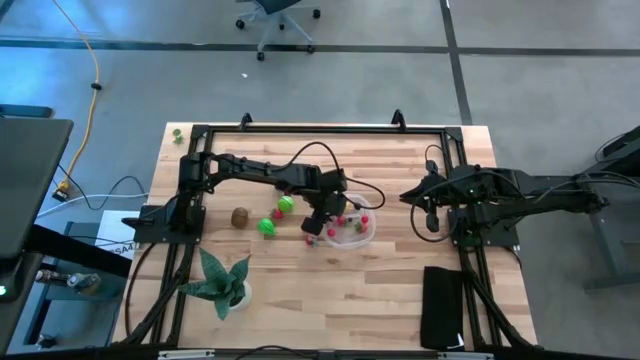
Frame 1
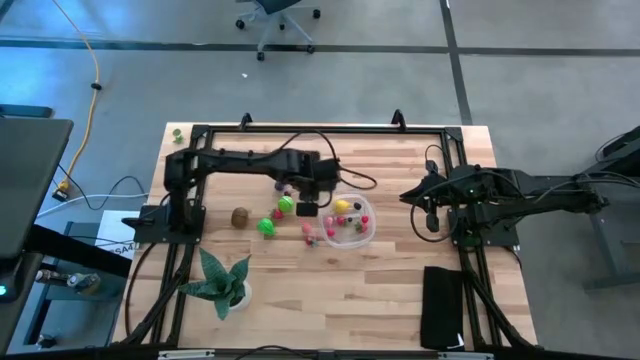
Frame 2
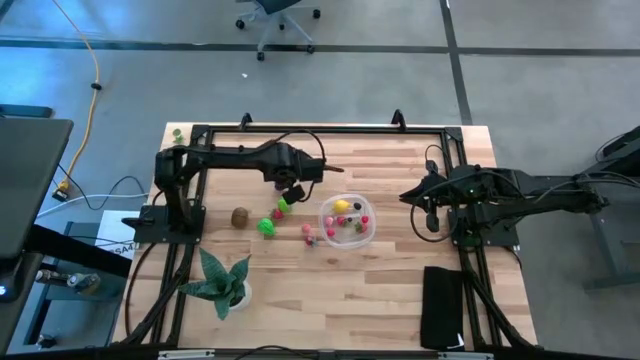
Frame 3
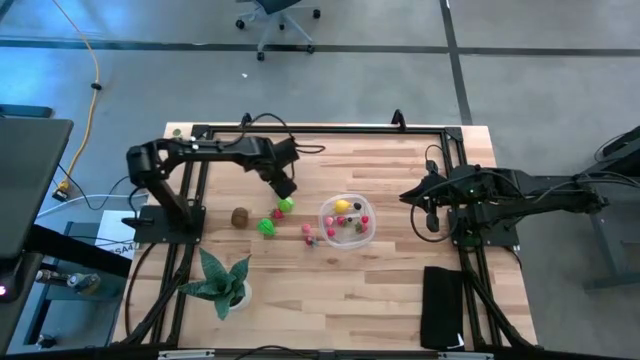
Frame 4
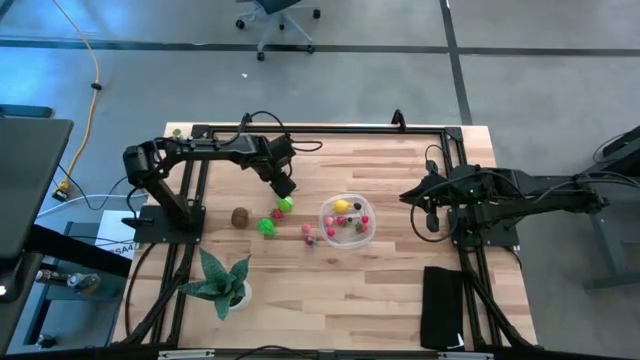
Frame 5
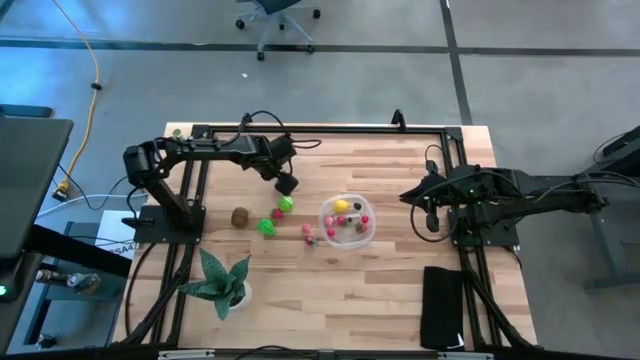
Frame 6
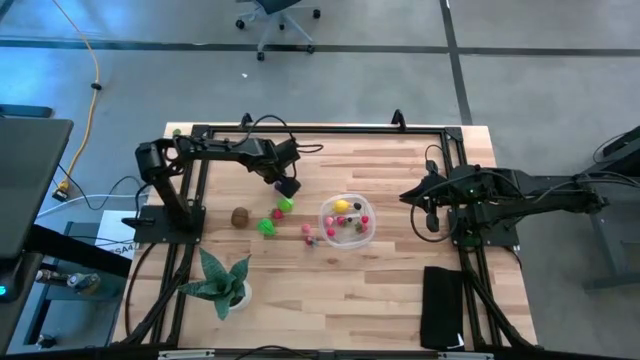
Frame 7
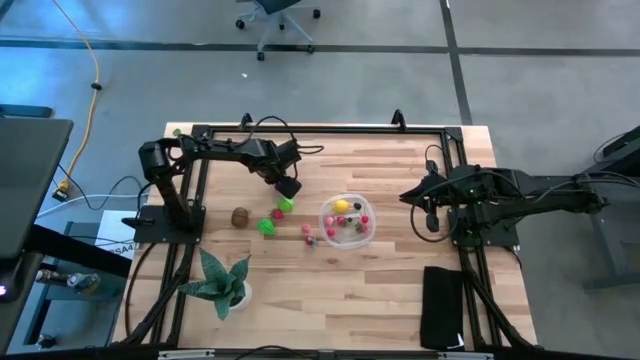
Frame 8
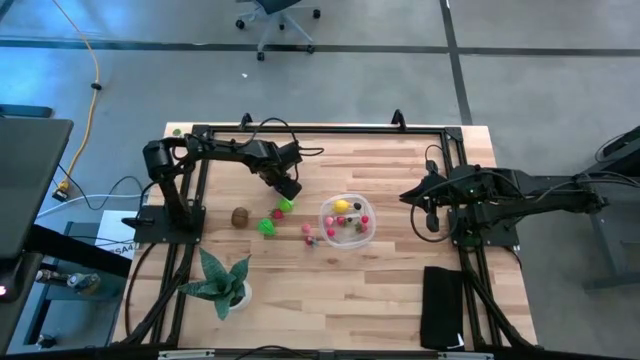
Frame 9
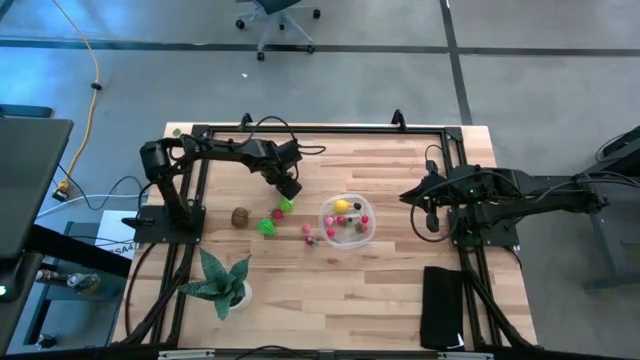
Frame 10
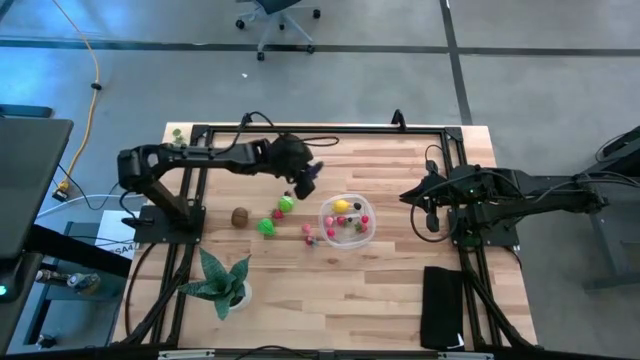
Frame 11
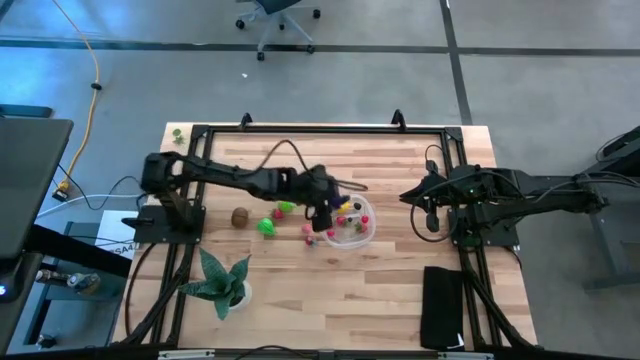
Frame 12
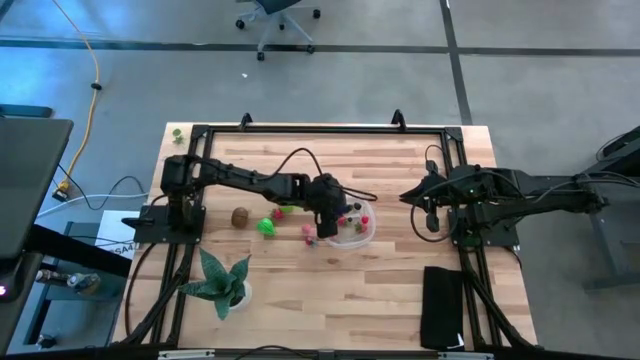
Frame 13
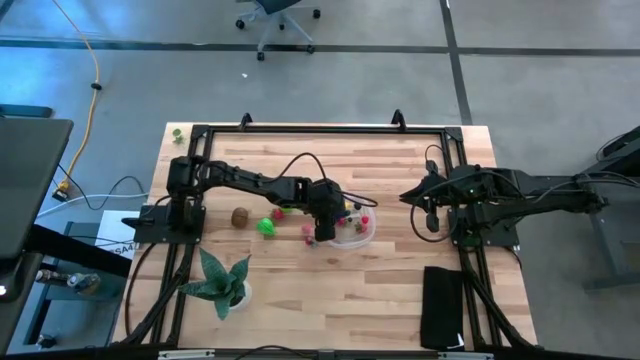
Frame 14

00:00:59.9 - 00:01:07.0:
Task: Pick and placing Produce into tupperware
Put the violet eggplant into the transparent container

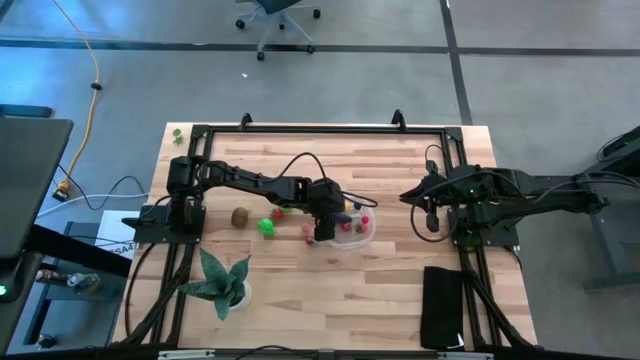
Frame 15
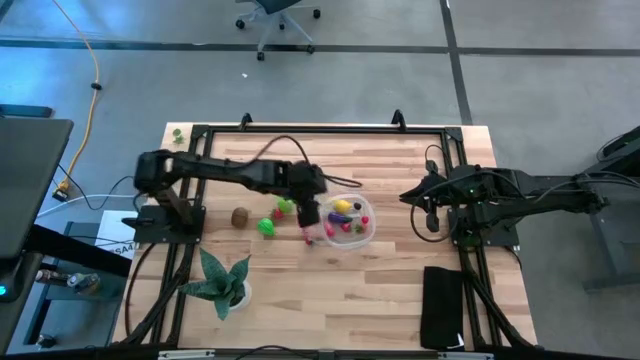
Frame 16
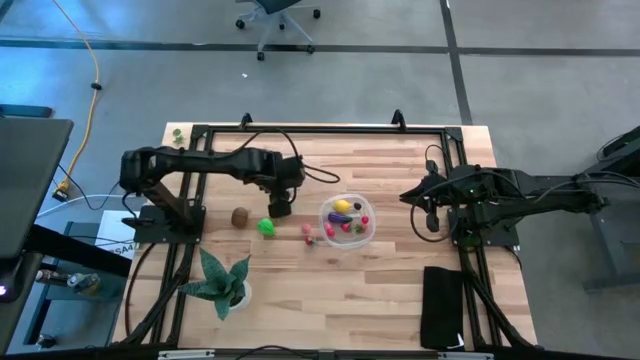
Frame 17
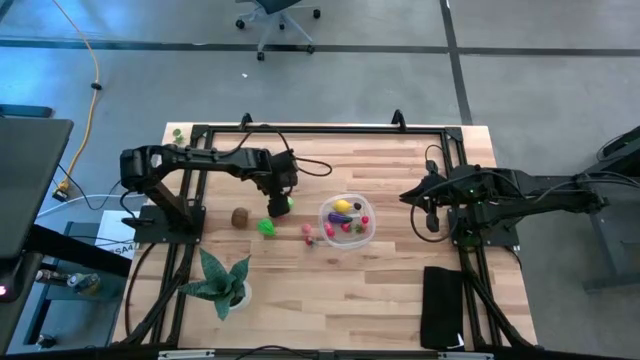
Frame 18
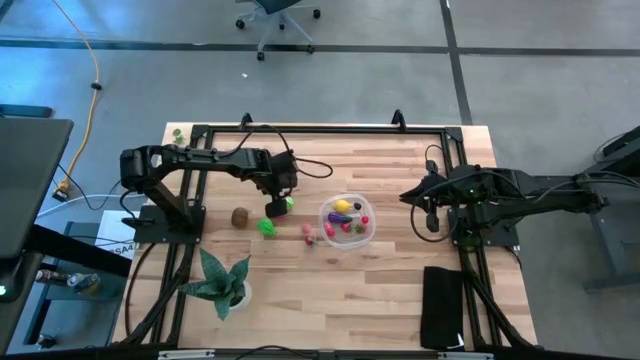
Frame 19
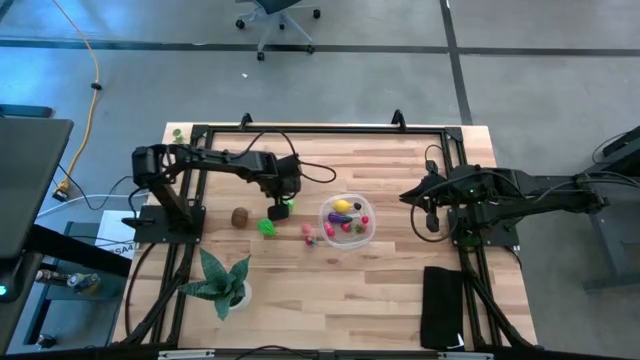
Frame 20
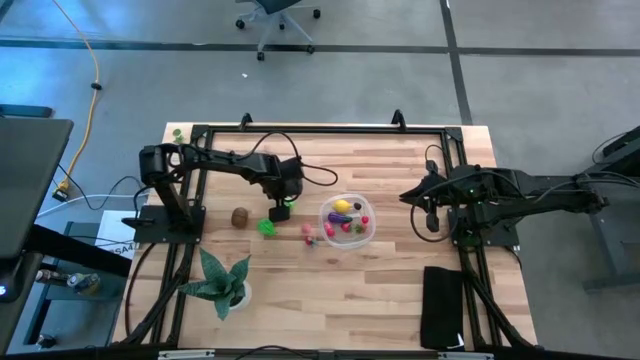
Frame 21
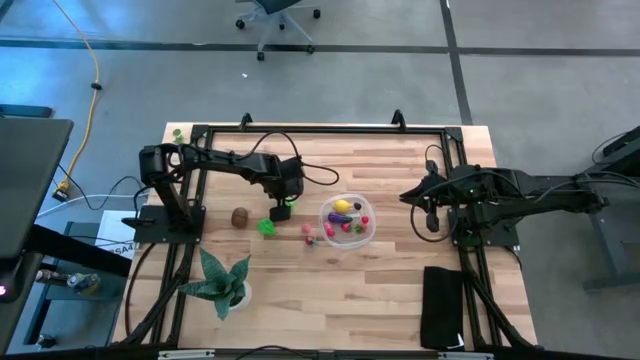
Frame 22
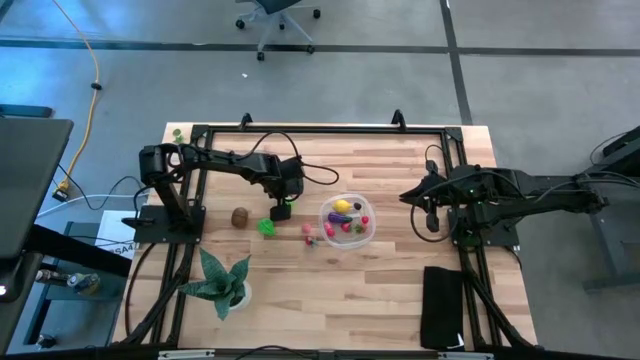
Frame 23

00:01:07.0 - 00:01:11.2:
Put the green cabbage into the transparent container

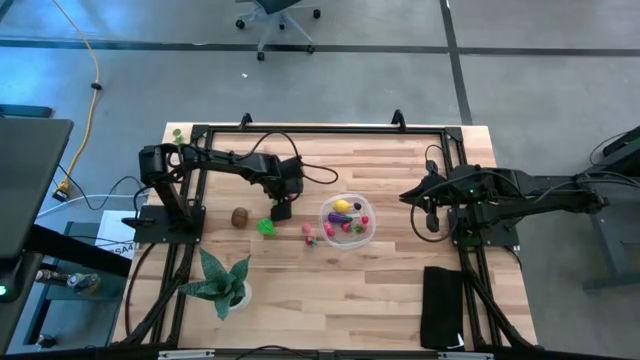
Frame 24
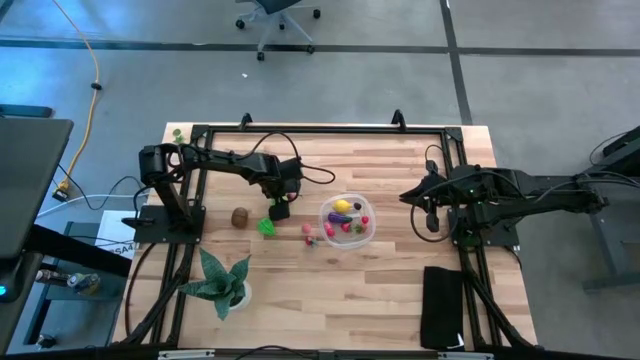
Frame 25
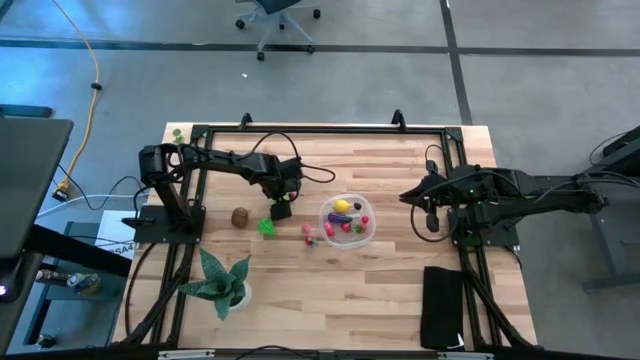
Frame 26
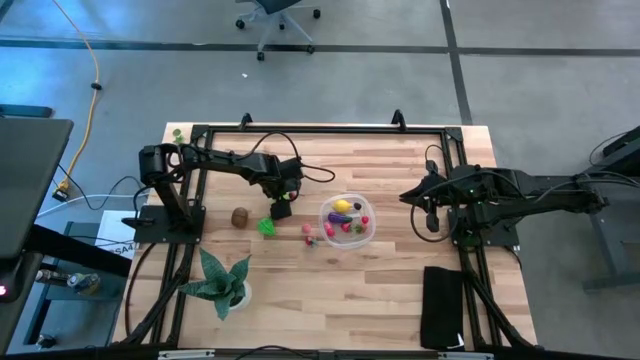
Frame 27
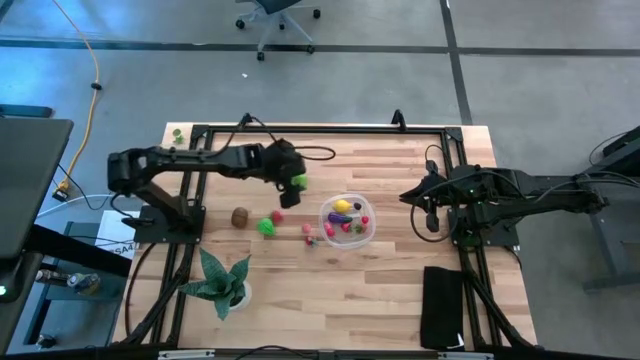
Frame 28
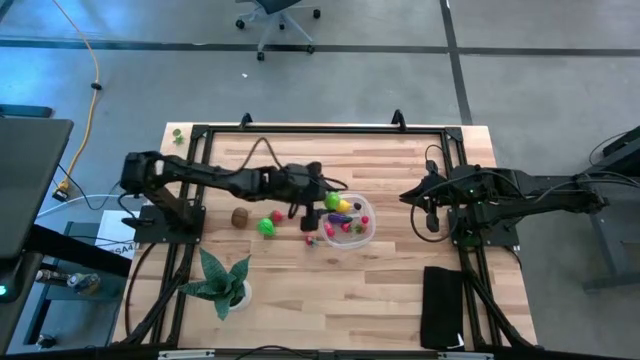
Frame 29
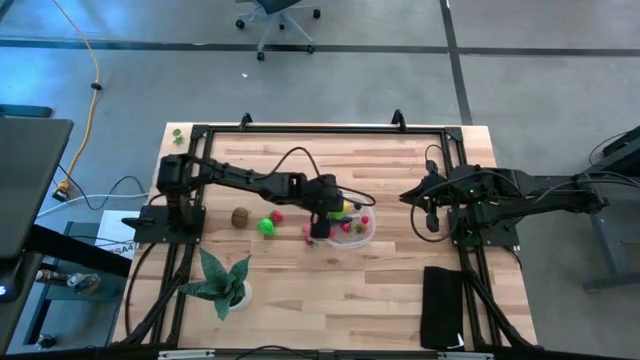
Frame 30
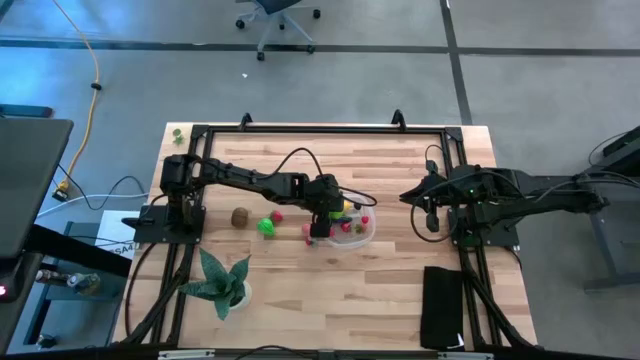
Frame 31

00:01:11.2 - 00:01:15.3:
Put the green cabbage into the transparent container

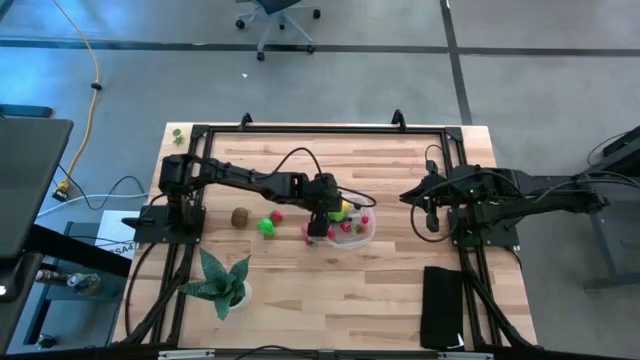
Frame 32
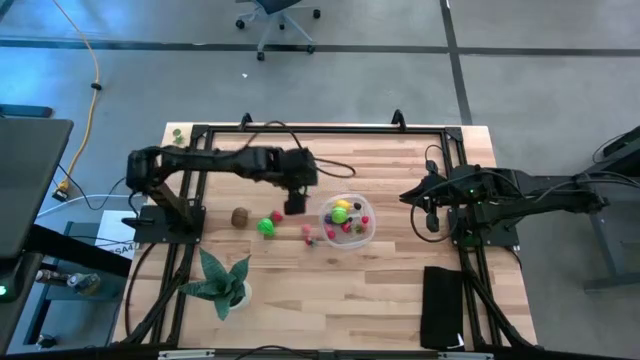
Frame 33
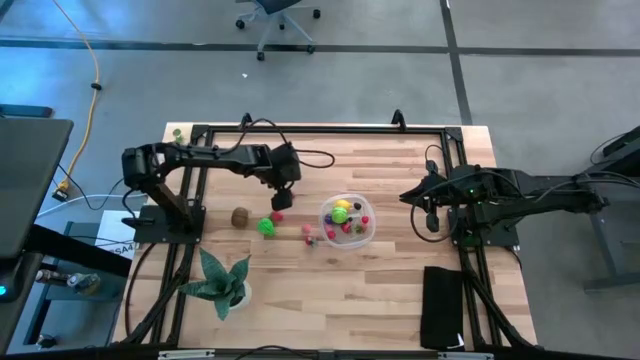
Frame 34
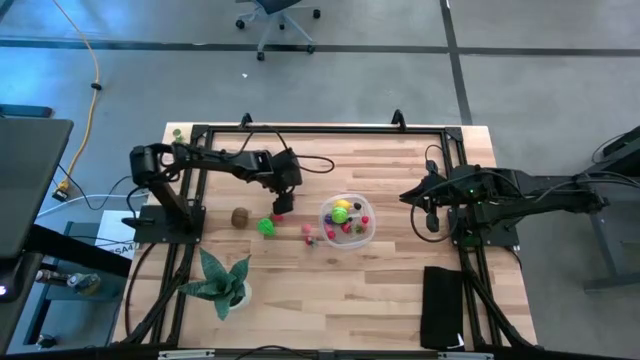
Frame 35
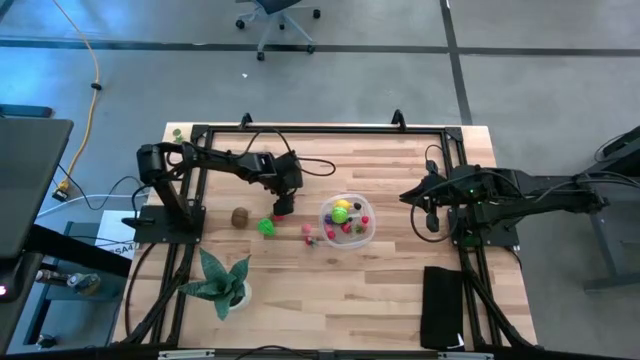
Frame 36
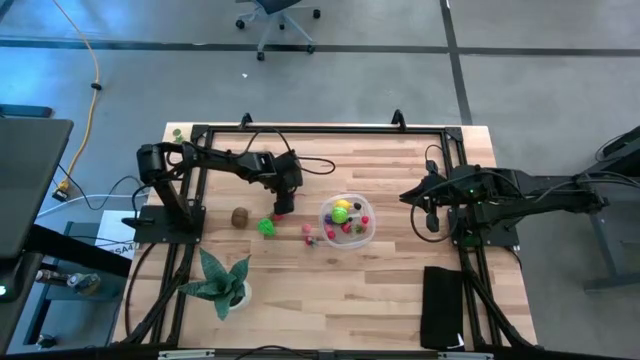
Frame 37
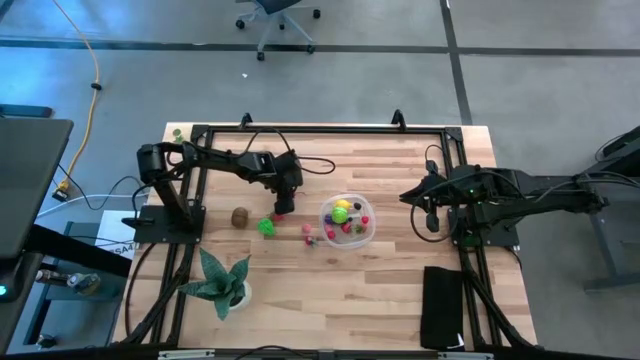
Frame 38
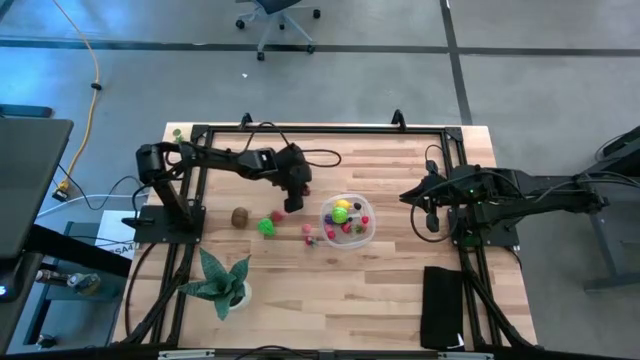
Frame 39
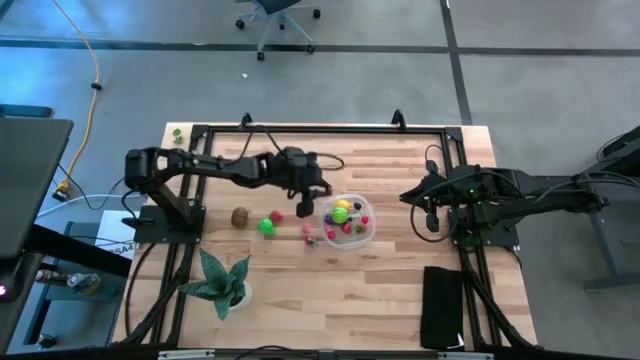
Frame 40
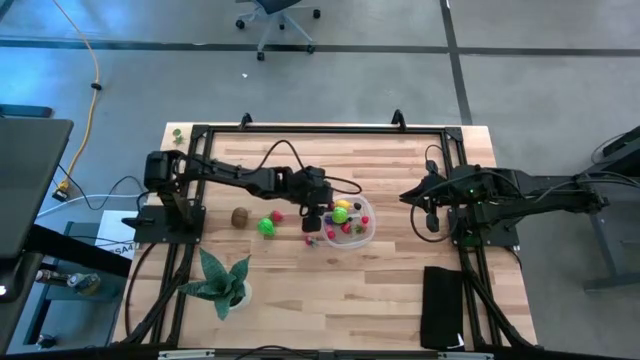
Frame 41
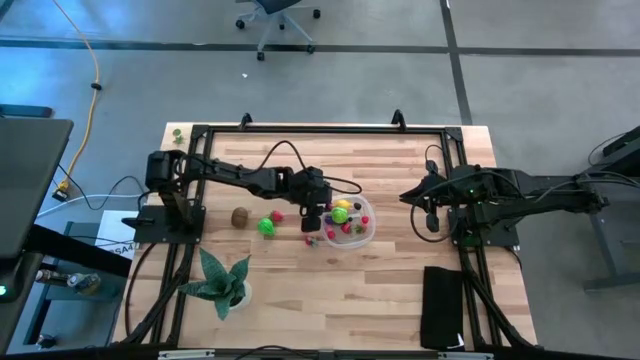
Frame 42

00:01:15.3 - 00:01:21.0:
Put the red cherry into the transparent container
